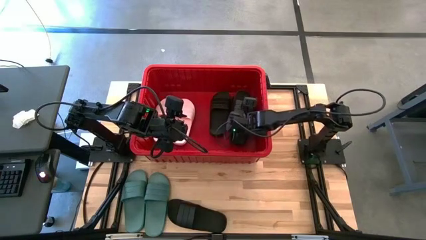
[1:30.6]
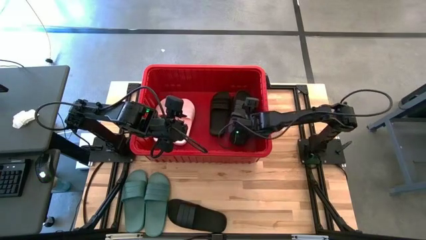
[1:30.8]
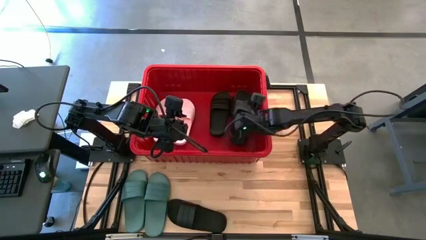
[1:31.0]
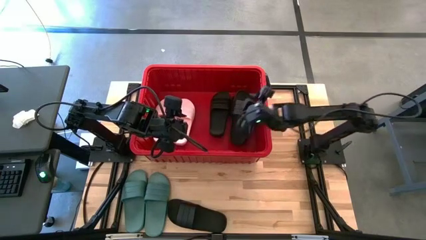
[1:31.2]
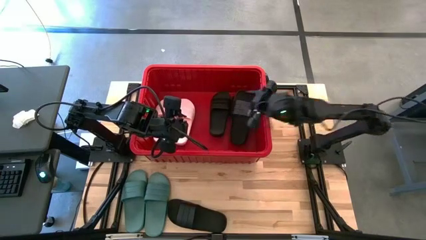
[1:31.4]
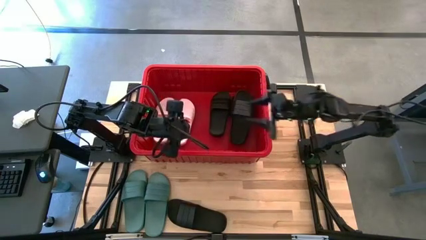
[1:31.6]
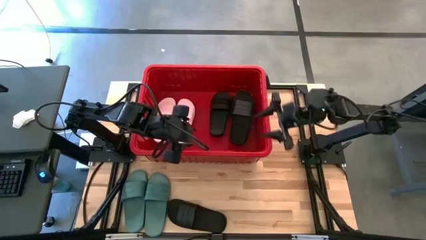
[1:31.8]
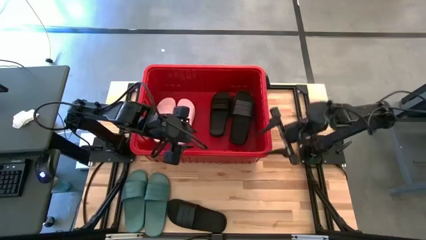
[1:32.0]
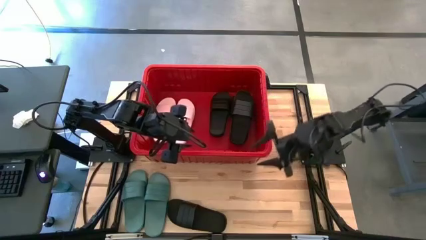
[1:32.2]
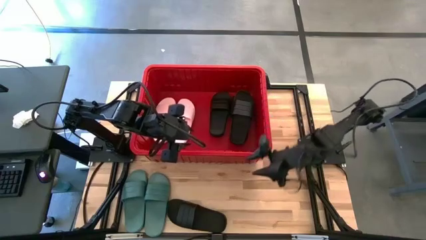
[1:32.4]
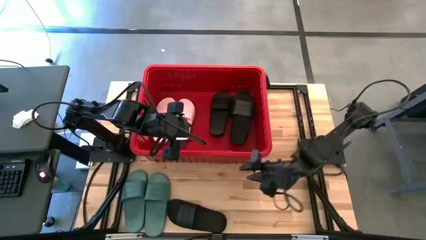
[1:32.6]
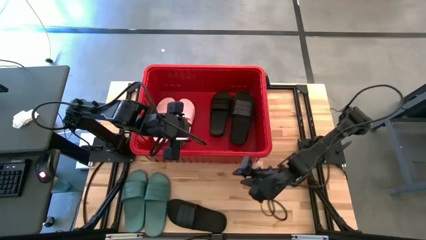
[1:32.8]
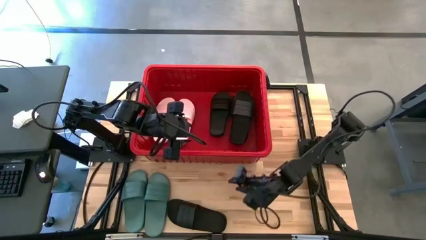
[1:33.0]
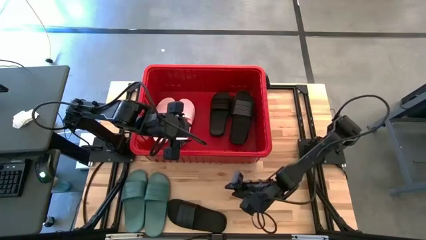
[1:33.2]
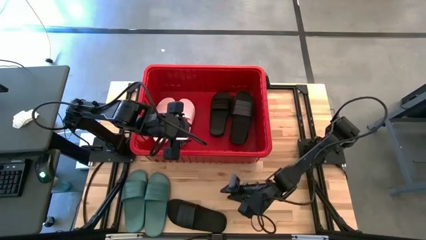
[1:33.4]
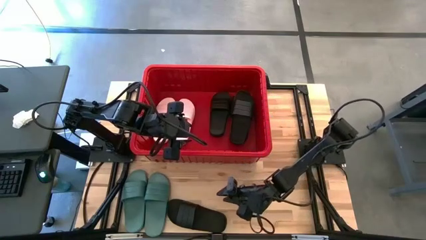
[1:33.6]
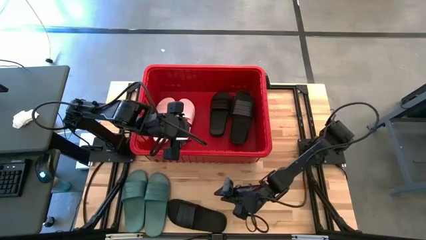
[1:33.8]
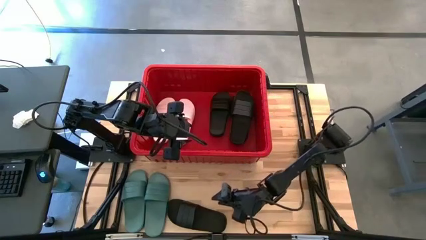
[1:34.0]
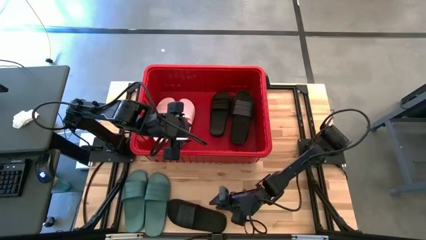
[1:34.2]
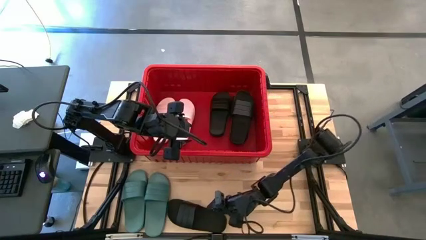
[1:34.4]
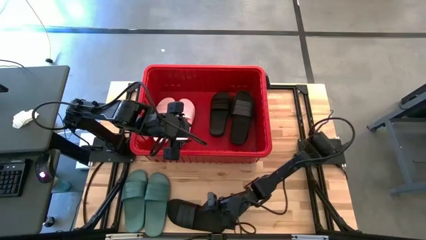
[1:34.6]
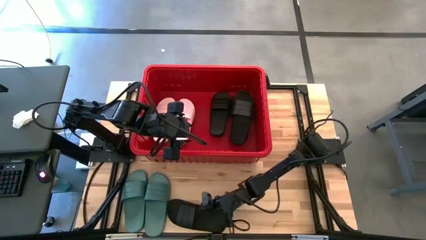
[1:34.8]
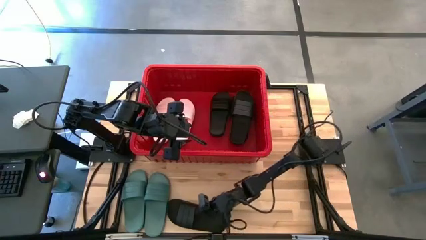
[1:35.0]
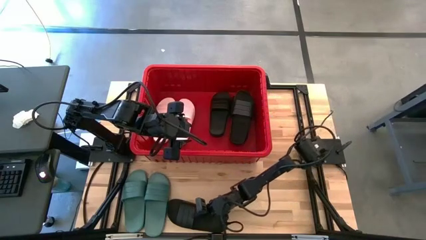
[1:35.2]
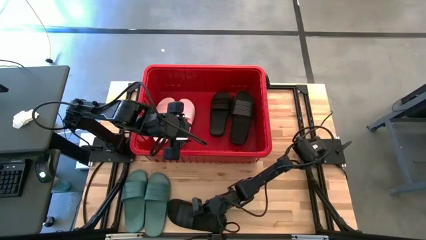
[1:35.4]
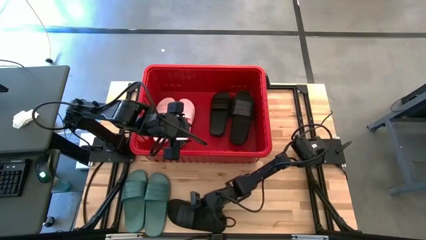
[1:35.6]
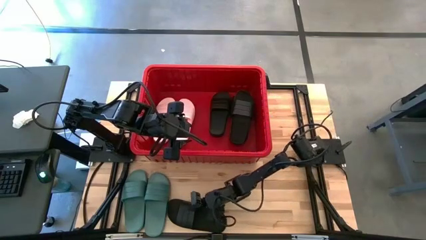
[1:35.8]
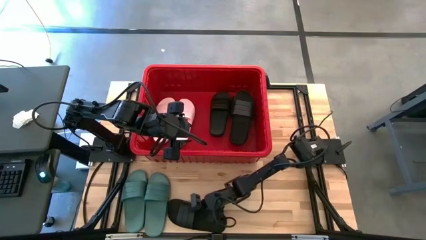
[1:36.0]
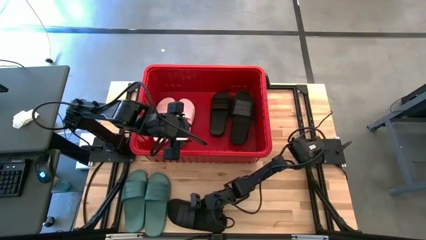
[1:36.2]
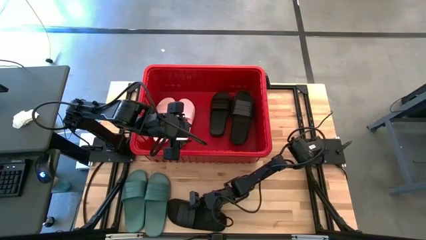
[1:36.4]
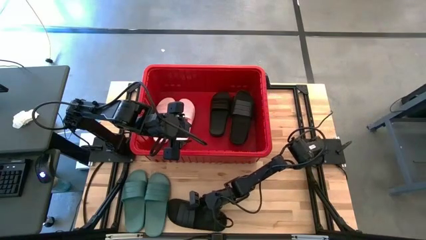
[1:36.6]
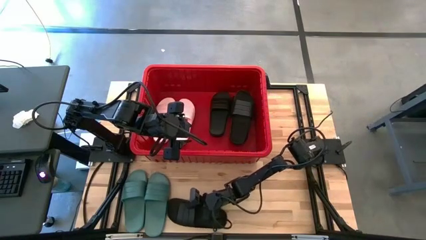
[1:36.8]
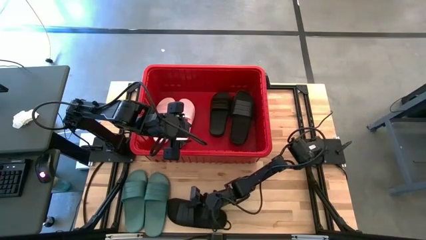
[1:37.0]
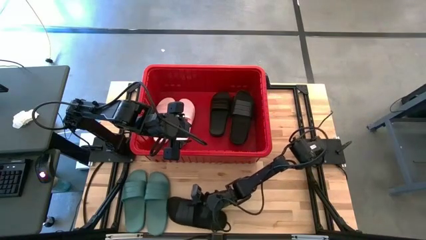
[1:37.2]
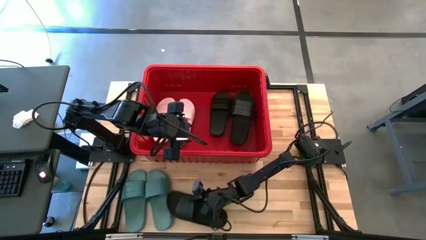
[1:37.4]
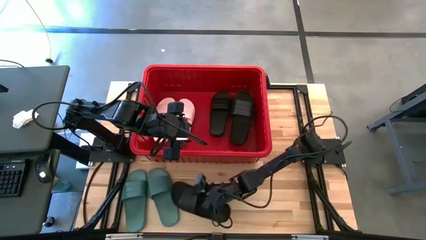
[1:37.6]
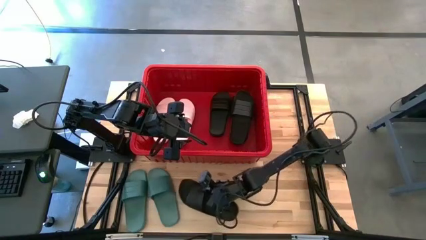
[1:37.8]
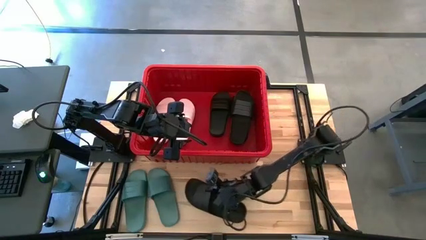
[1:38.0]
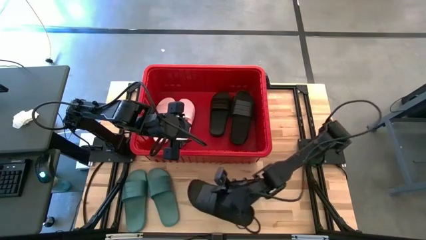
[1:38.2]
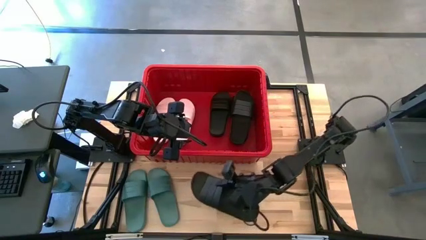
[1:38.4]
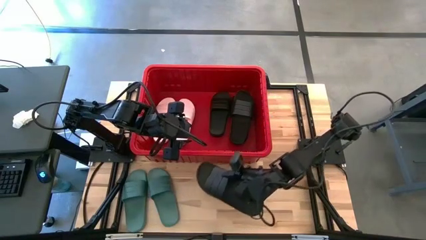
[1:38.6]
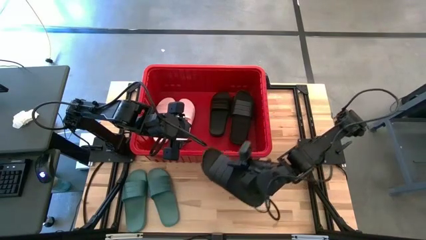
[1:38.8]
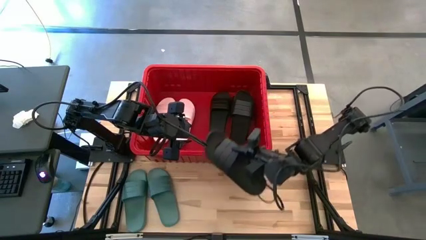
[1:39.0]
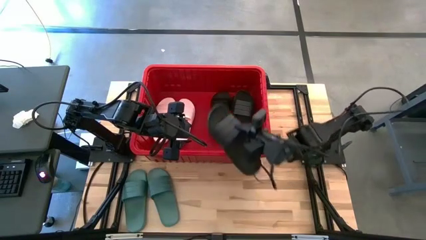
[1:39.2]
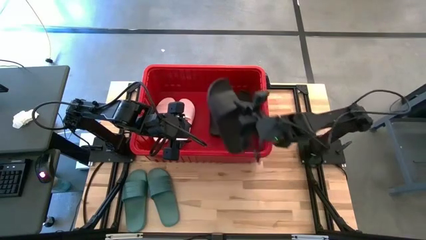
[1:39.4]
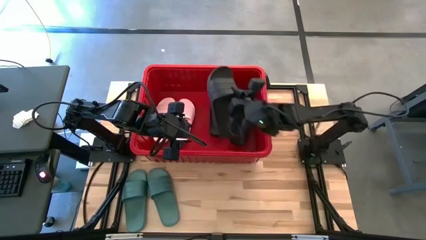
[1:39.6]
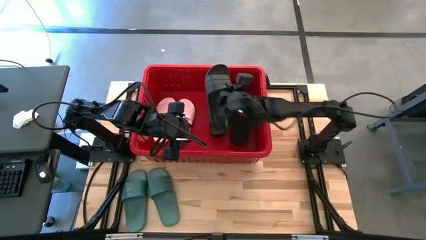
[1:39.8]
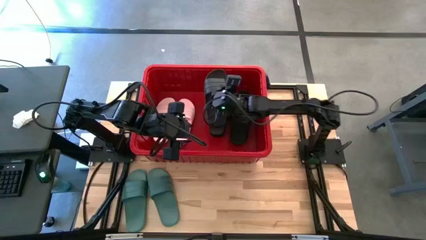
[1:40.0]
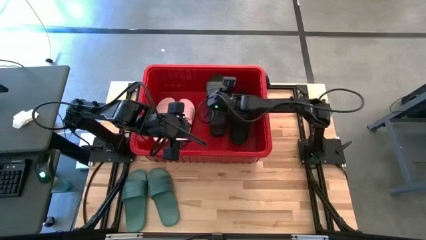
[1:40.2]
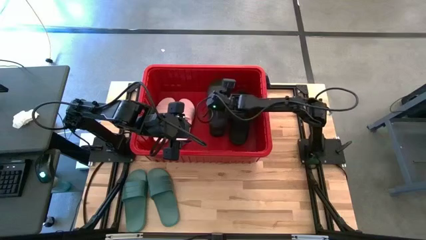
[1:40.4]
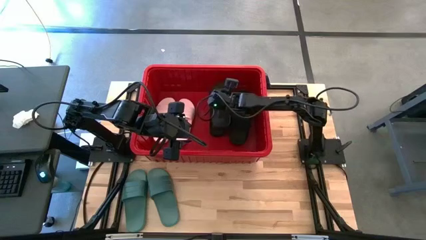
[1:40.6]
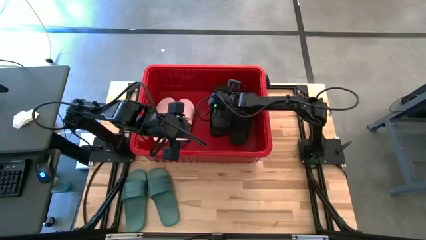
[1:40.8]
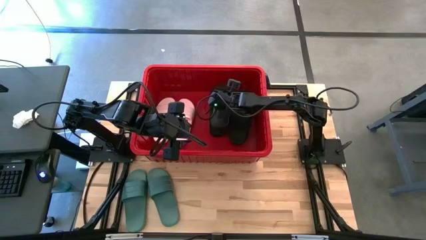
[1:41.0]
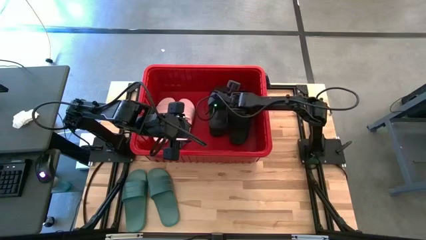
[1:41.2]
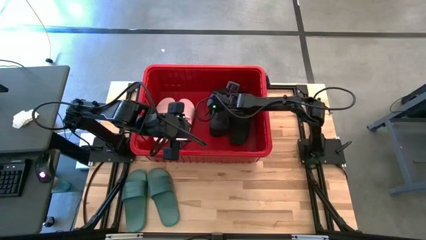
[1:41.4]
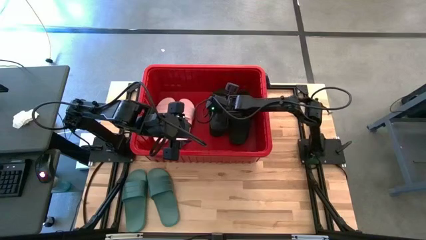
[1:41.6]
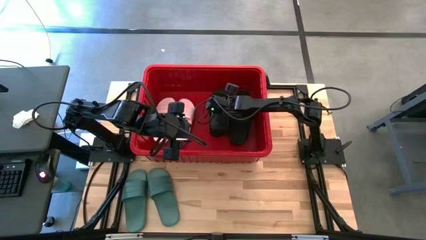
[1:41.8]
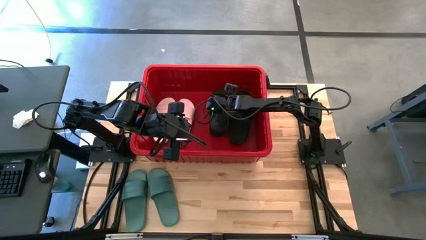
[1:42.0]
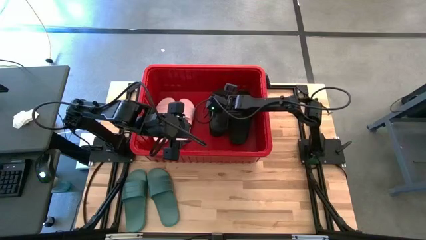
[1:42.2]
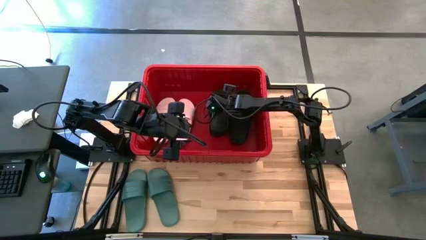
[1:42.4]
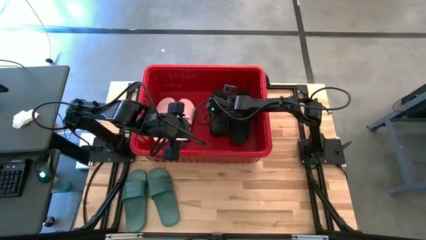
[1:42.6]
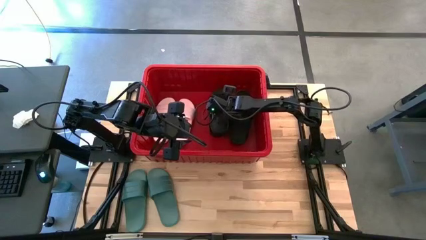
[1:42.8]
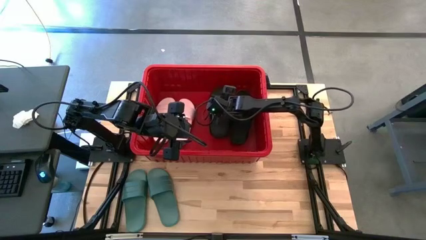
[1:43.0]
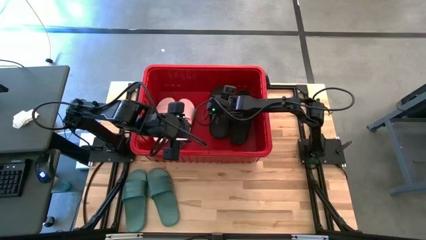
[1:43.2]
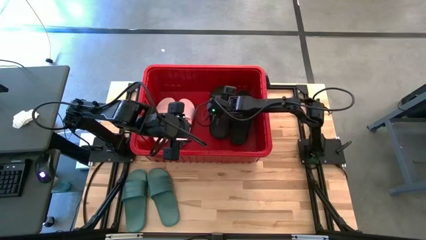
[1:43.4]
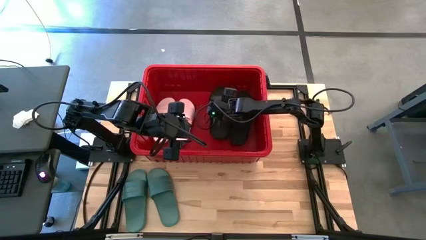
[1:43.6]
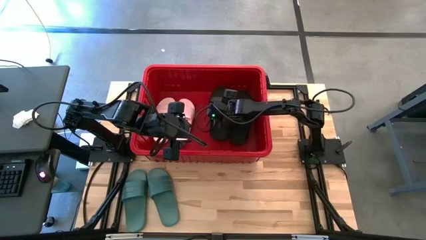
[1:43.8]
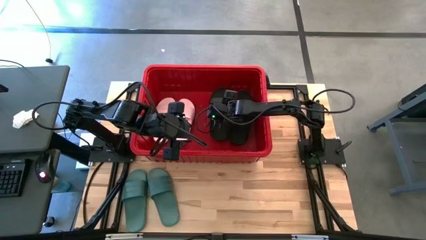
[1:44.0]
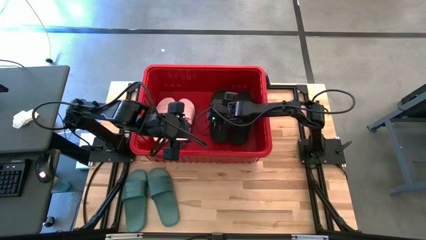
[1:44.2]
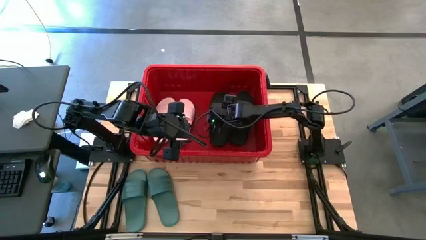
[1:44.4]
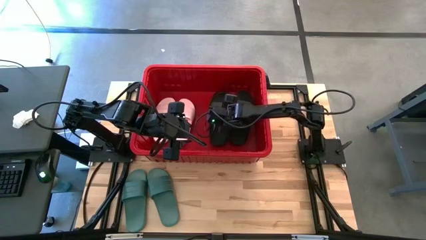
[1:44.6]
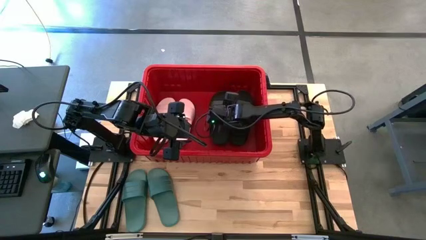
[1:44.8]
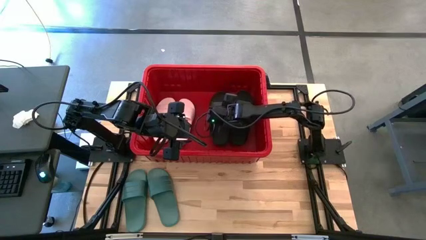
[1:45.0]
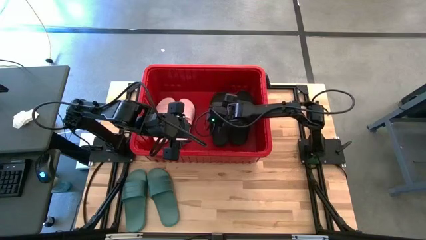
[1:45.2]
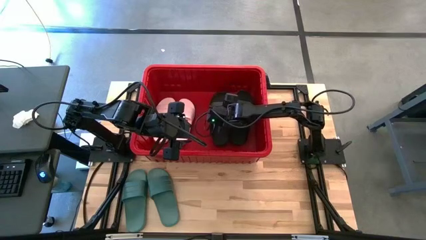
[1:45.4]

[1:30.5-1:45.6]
Task: Pick and place slides into bin
Put the black slide into the red bin

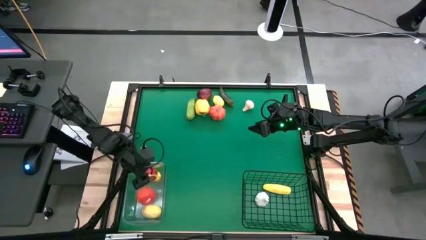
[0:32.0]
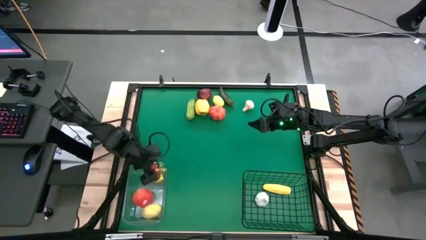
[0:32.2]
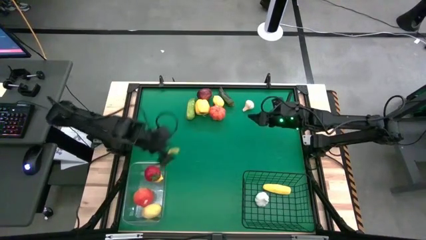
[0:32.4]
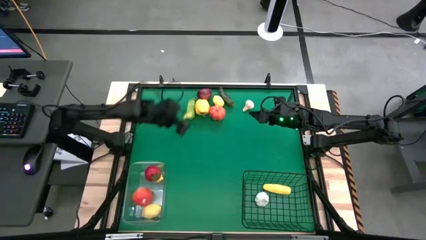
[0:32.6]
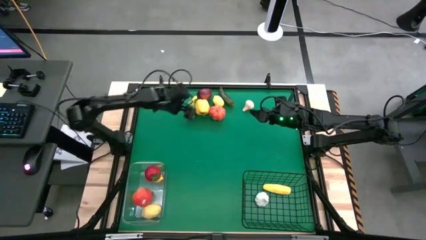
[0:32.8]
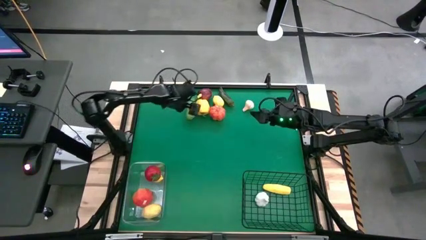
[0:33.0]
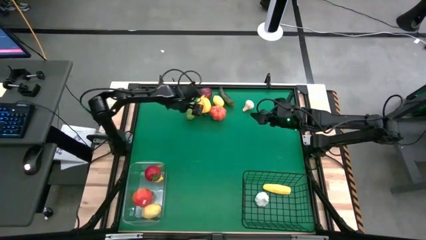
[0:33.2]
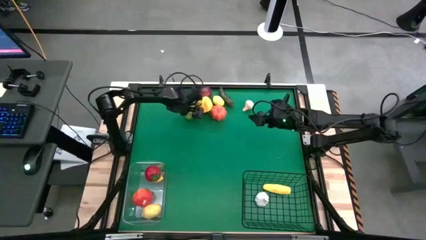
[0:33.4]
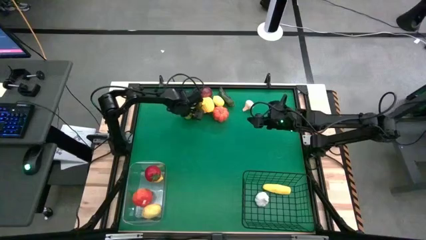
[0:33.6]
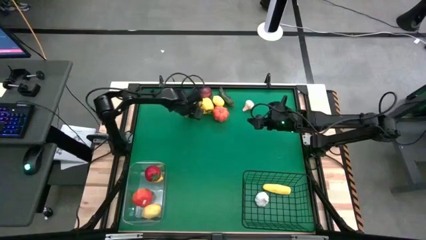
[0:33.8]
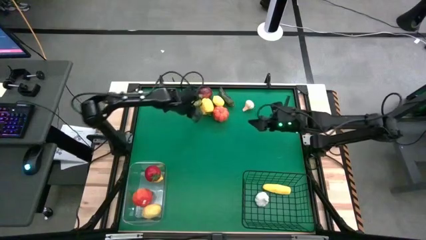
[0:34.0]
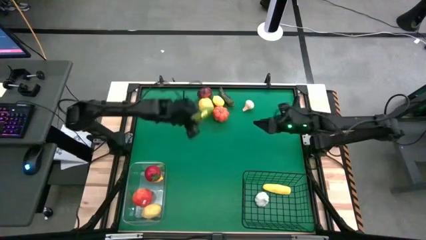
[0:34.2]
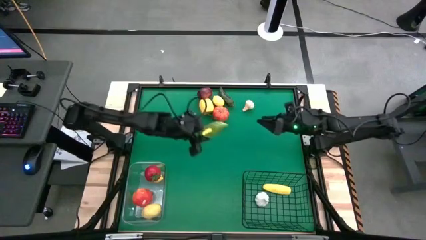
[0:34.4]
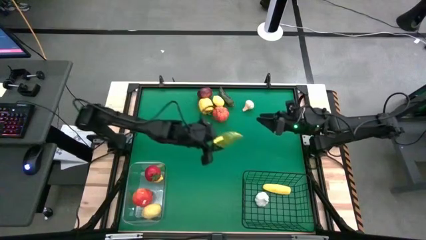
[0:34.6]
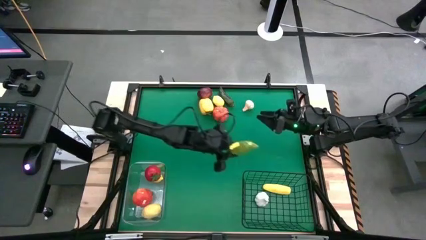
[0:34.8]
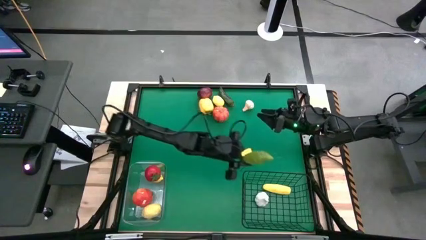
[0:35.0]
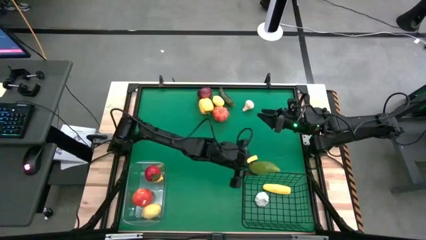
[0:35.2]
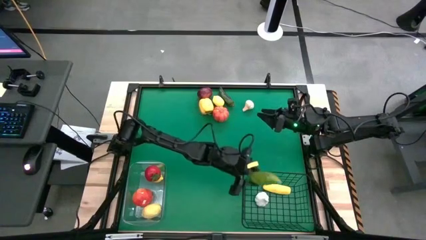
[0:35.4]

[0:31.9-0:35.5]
Task: Sort produce into baskets
Put the cucumber into the wire basket
